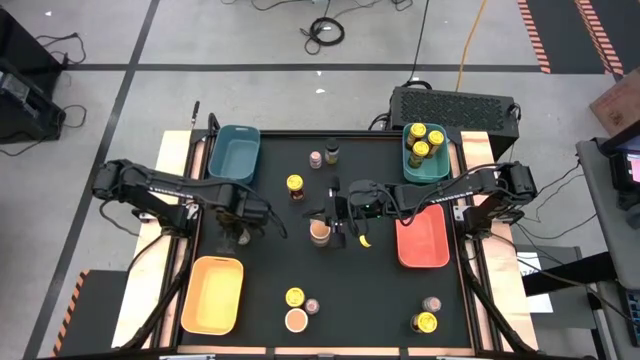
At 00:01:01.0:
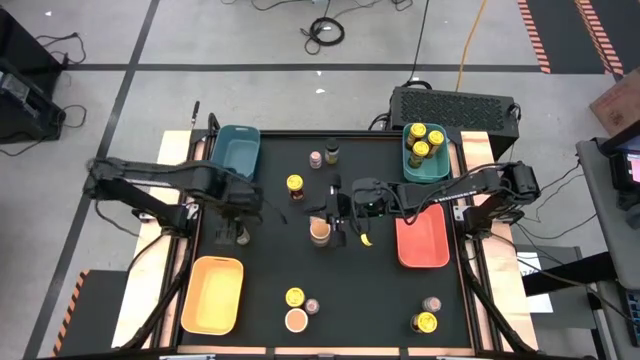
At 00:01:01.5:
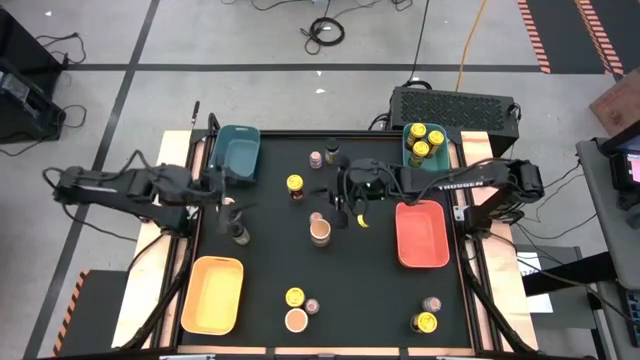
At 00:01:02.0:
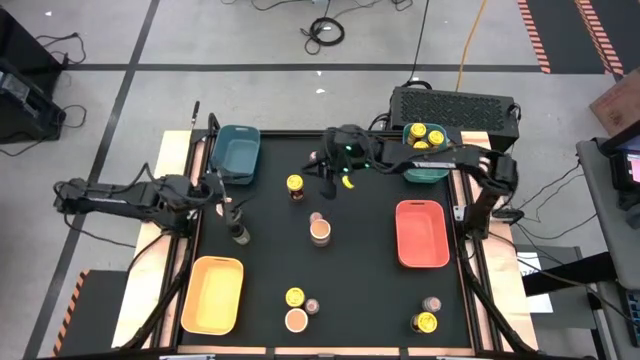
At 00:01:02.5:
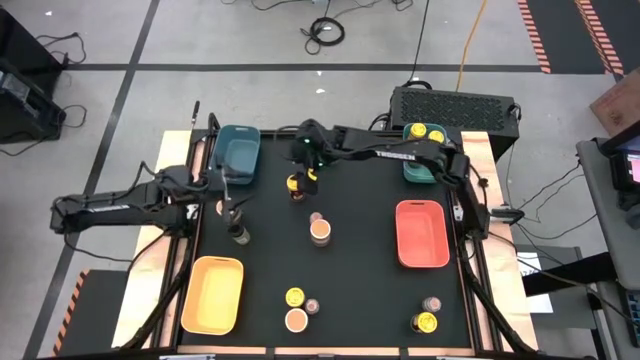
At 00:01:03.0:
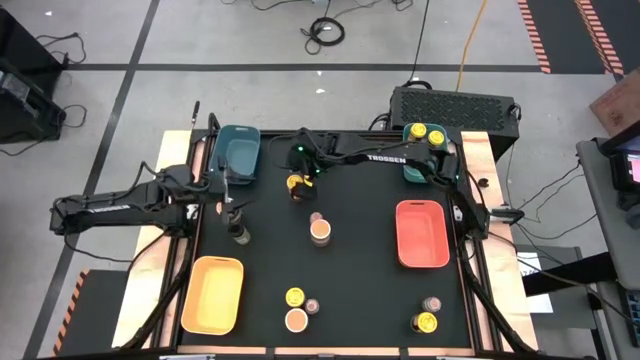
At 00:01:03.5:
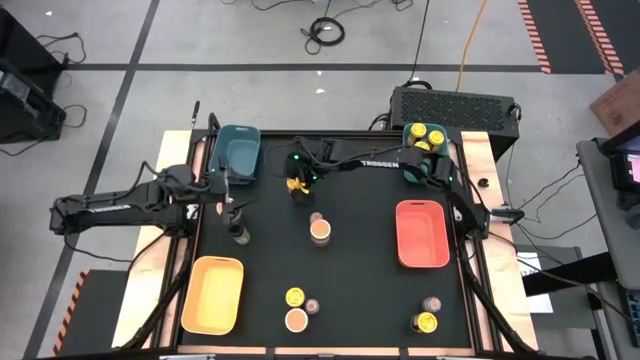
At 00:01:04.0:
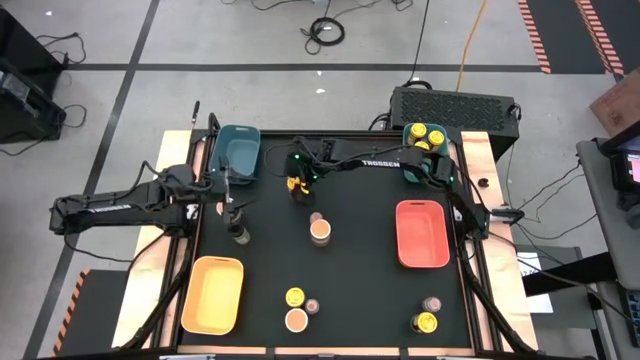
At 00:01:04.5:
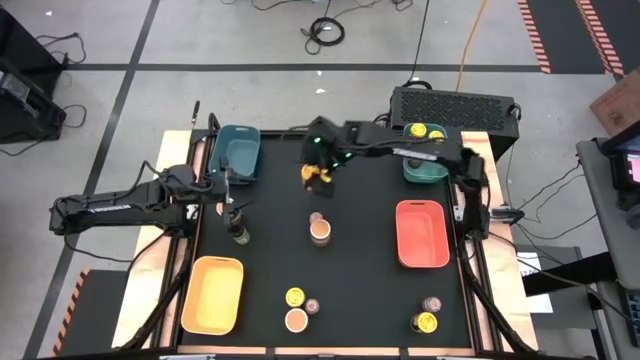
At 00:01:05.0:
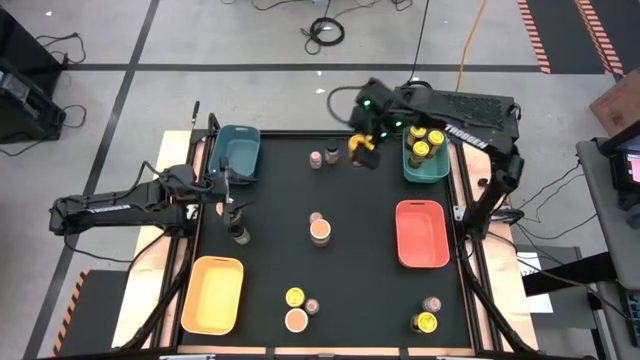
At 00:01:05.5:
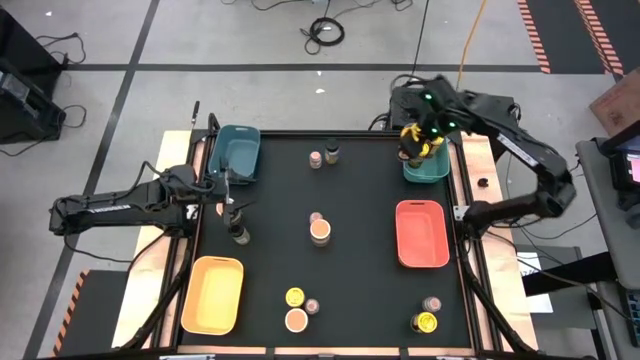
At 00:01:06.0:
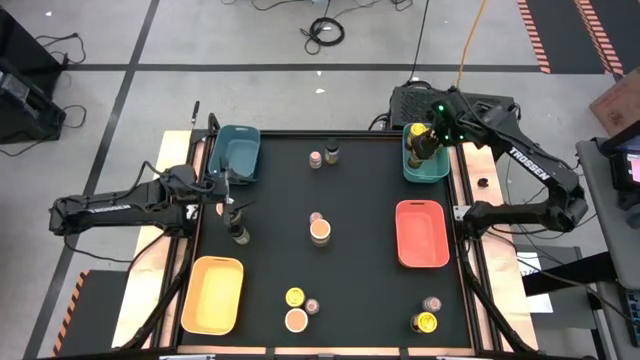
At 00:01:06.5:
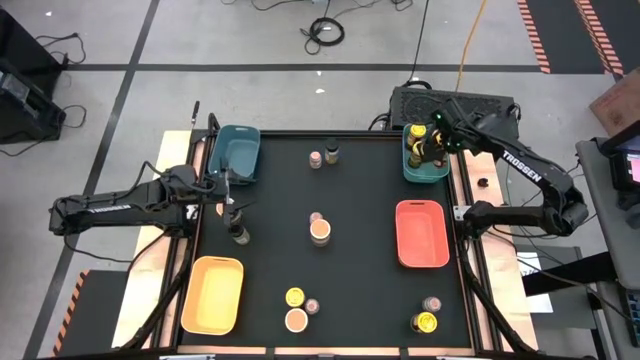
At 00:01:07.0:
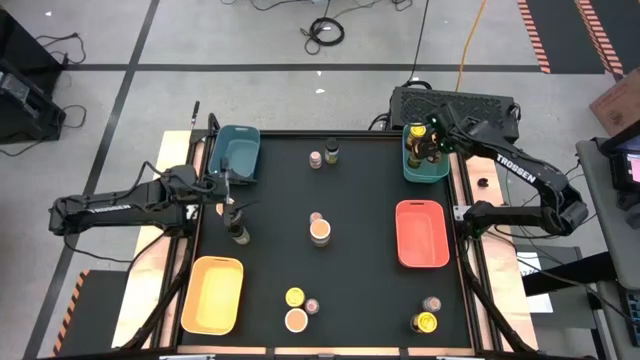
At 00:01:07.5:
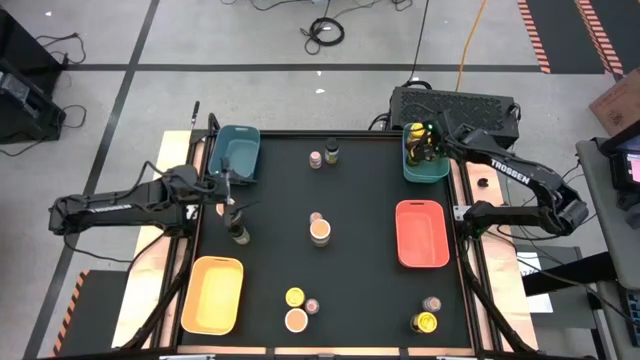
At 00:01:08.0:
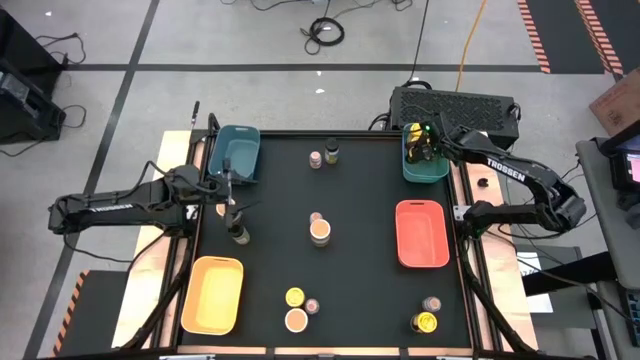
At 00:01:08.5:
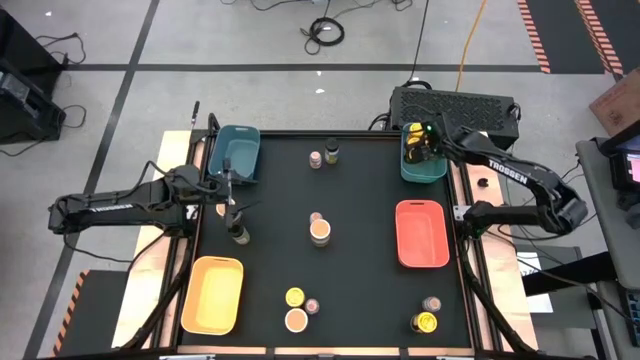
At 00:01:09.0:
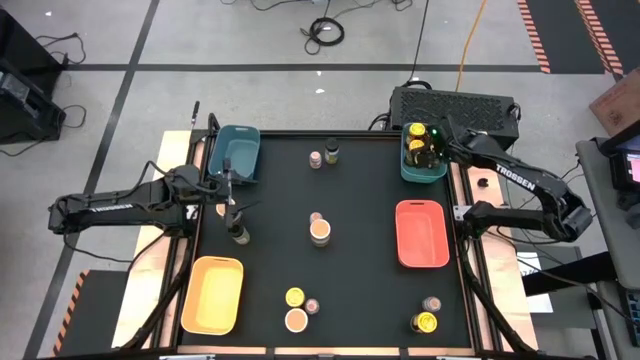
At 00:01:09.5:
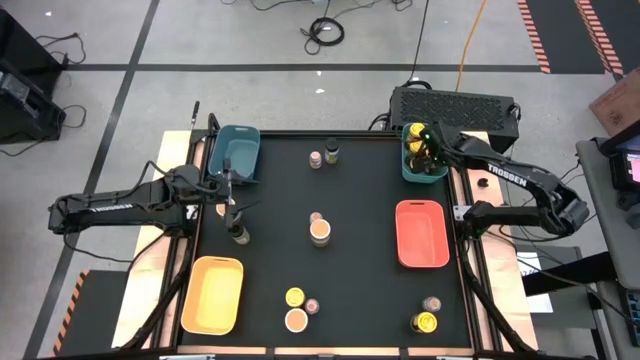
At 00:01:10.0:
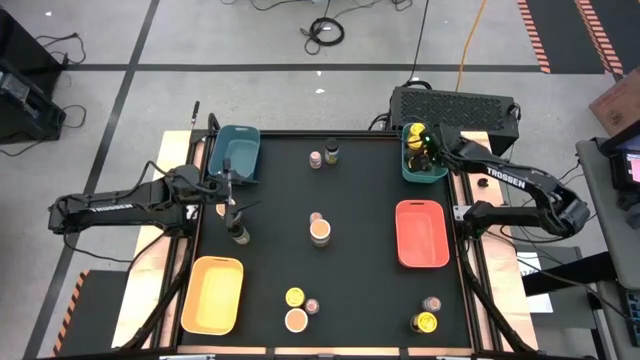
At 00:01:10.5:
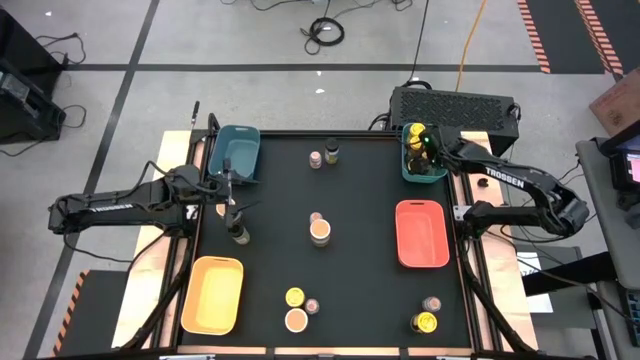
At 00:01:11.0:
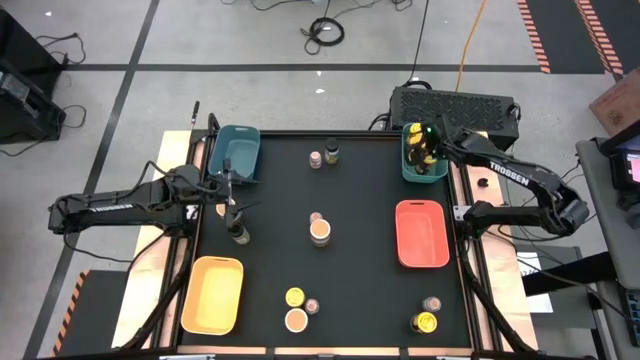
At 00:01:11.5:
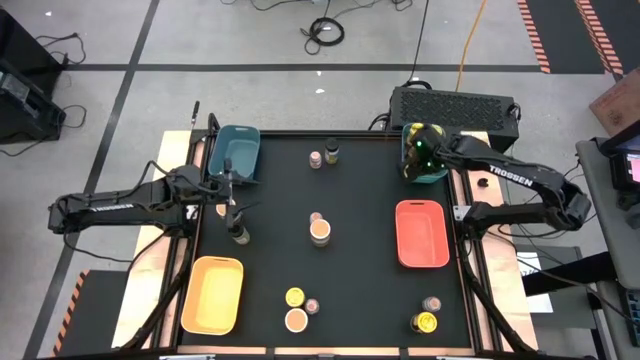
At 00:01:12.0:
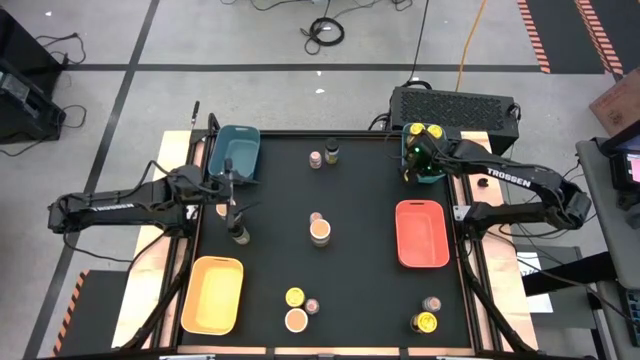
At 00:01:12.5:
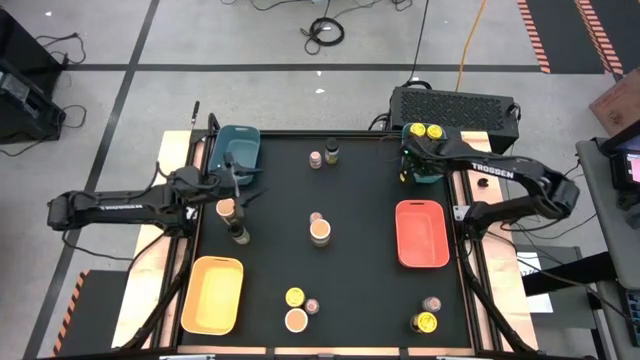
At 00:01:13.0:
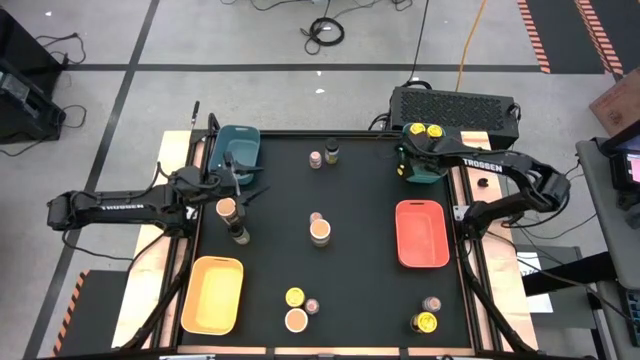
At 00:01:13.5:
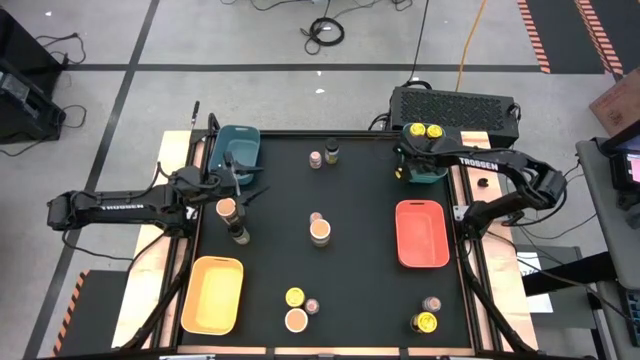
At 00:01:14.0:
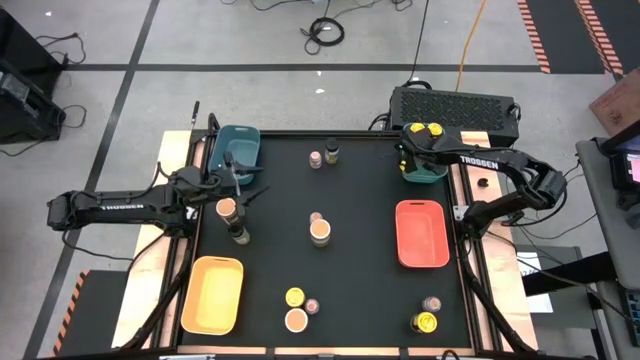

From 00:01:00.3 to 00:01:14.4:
Task: Sort spices by type
Put the yellow spice bottle into the green bin

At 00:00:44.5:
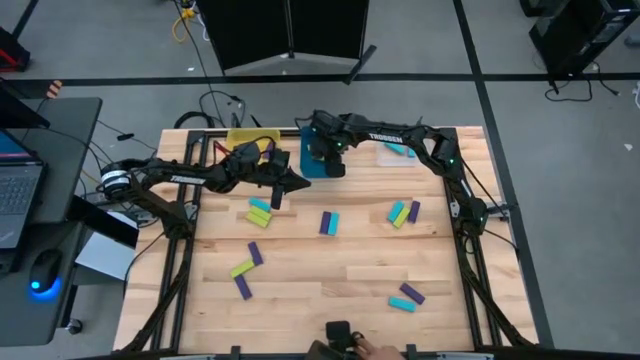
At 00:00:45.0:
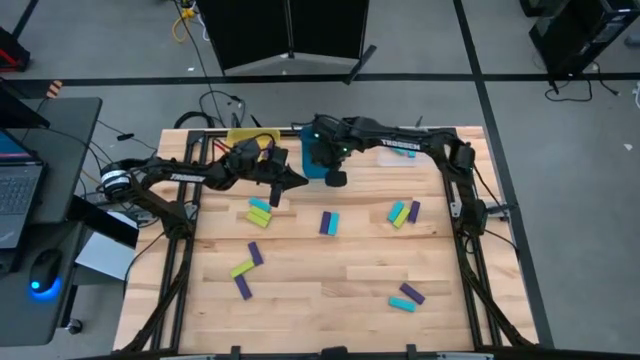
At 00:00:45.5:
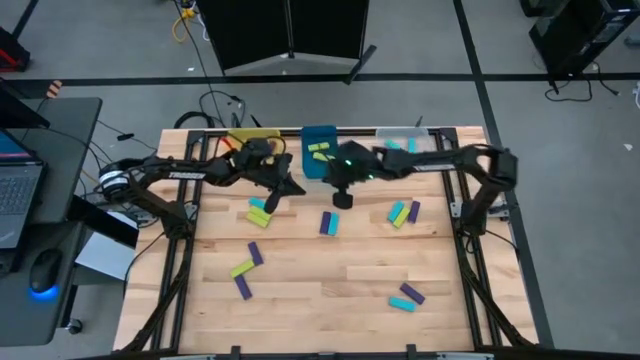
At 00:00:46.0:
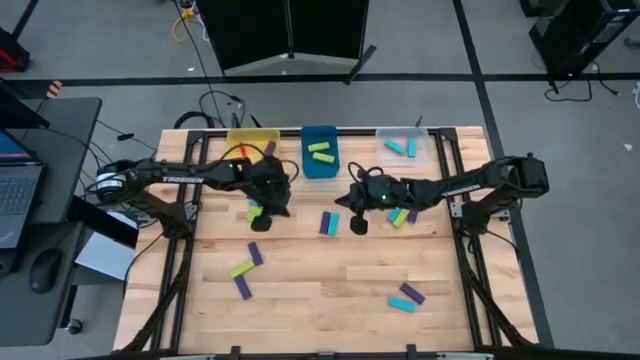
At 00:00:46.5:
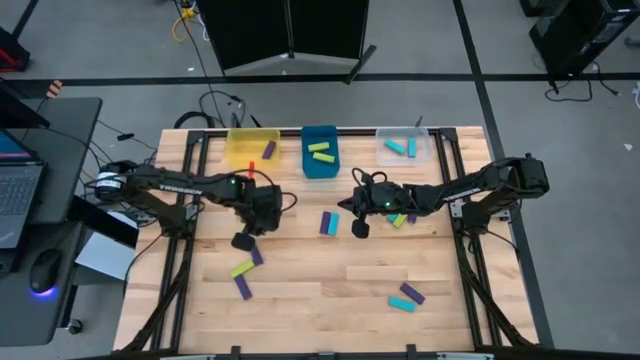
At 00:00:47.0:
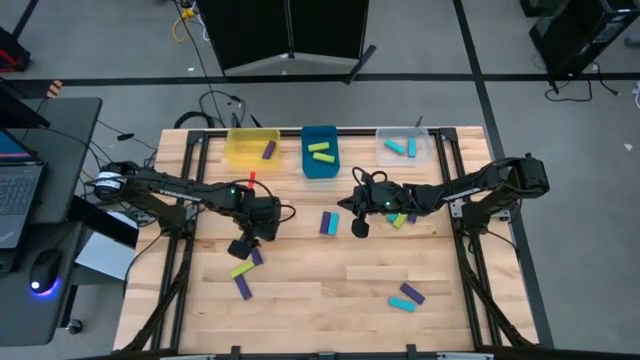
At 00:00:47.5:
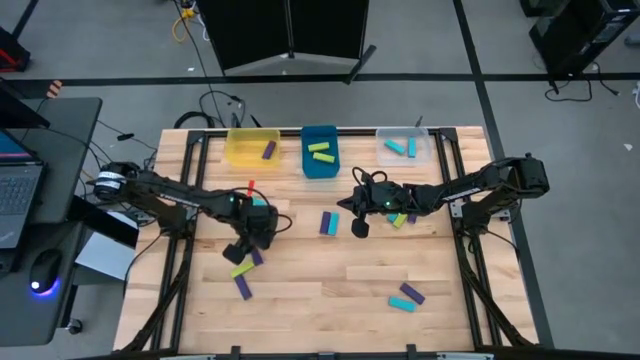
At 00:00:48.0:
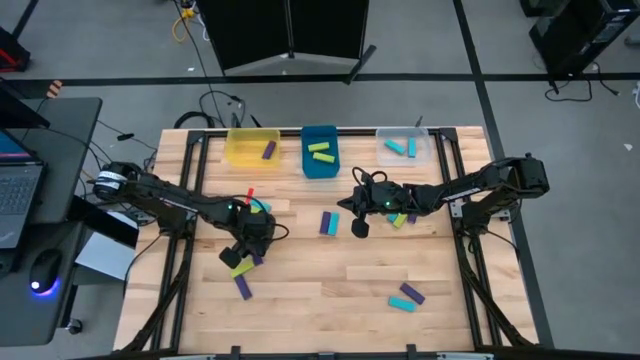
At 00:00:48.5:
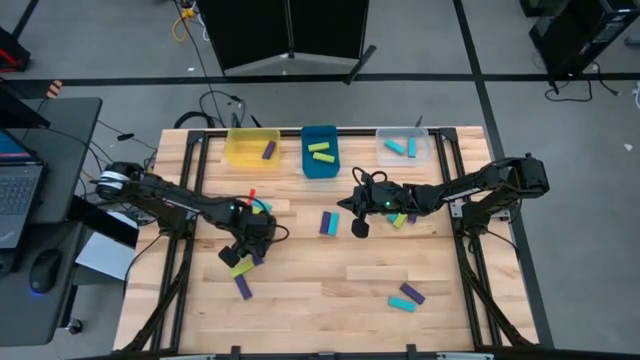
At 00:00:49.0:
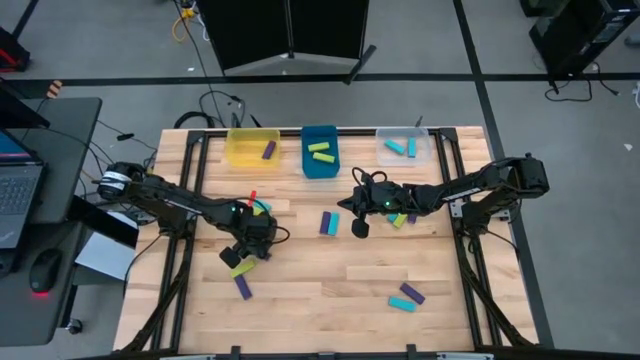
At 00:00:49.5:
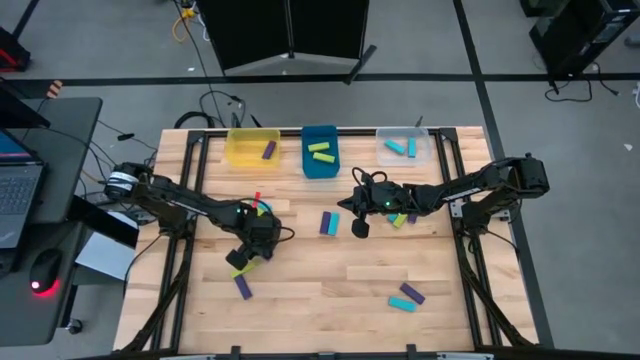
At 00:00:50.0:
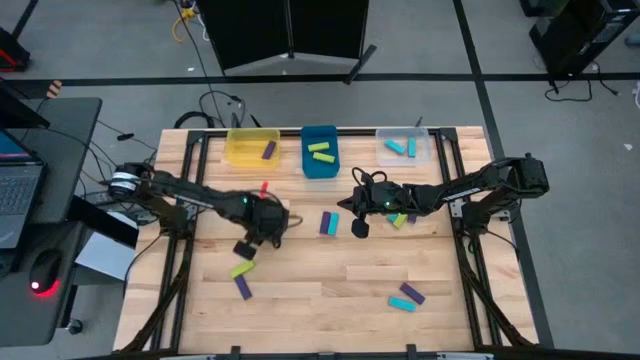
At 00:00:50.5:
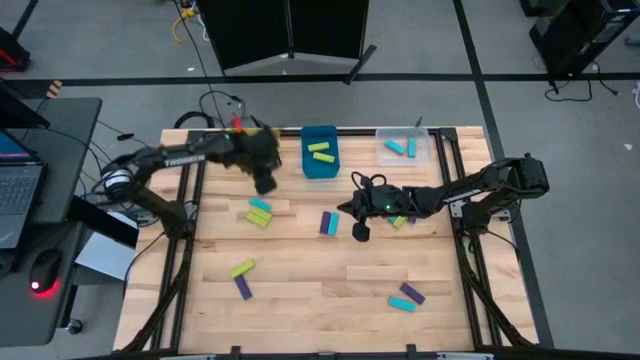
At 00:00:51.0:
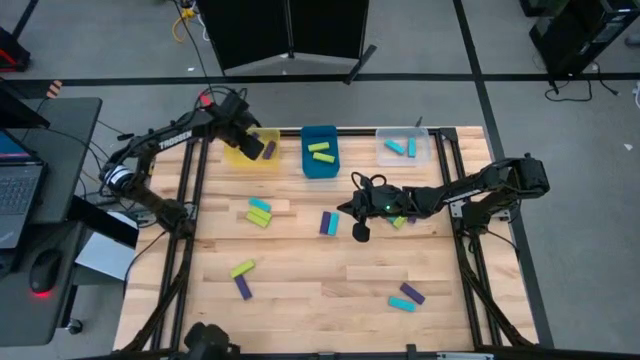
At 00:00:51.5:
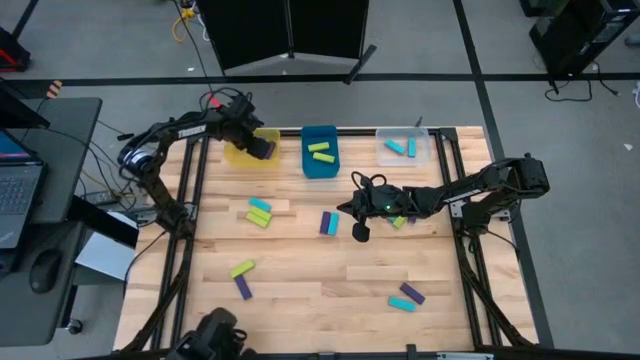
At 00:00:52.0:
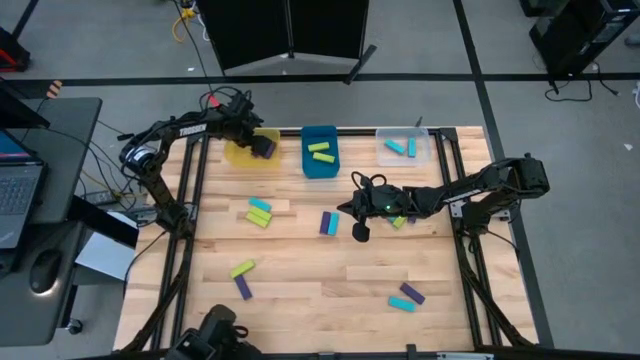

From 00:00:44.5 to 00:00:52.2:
Task: Sort blocks
Put the violet block into the yellow bin
